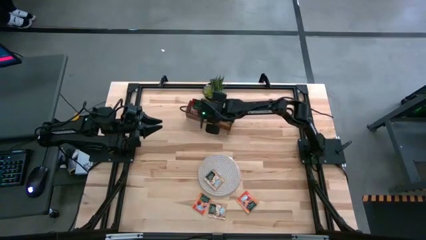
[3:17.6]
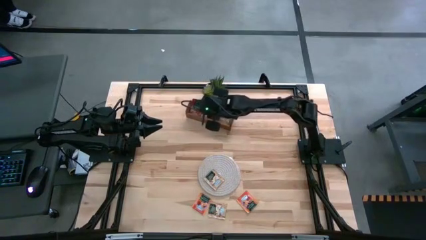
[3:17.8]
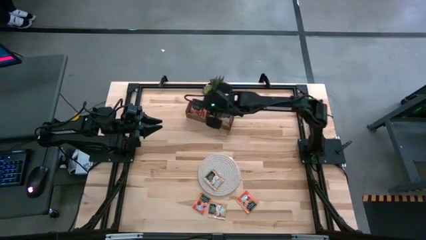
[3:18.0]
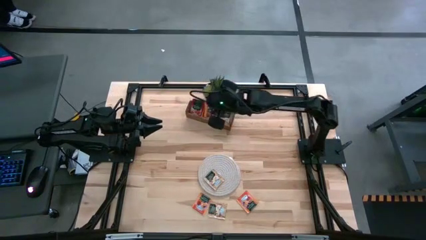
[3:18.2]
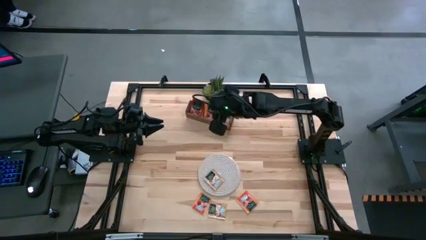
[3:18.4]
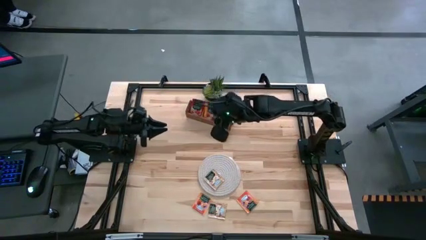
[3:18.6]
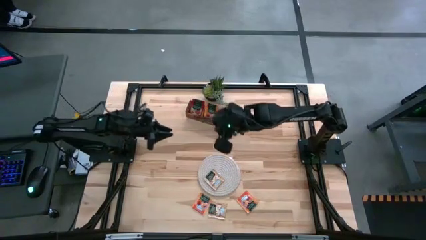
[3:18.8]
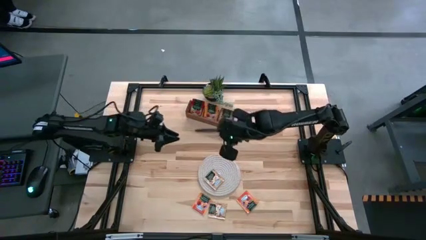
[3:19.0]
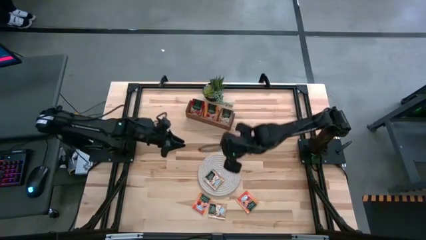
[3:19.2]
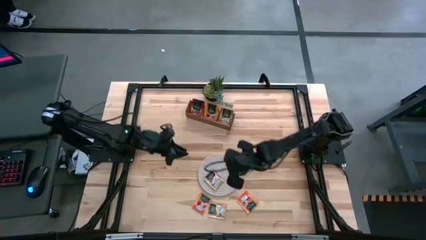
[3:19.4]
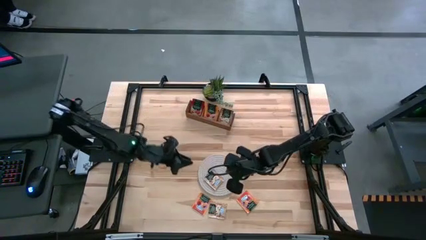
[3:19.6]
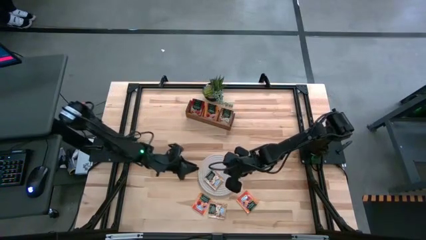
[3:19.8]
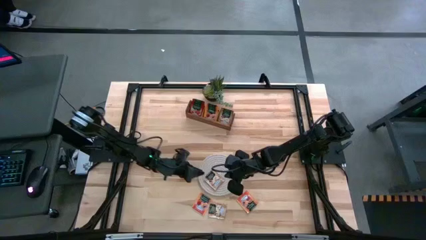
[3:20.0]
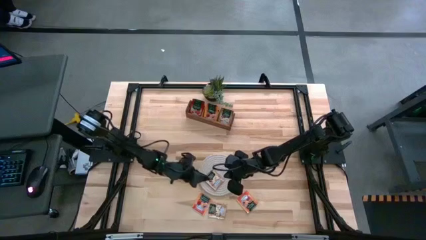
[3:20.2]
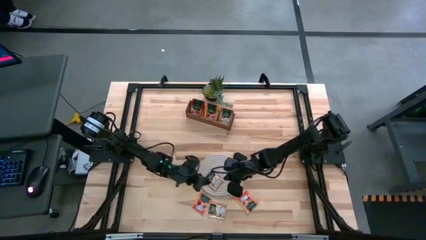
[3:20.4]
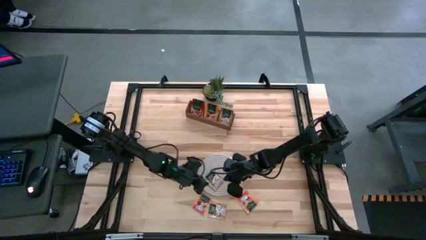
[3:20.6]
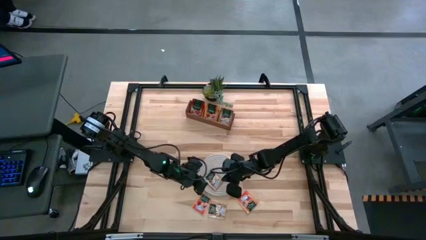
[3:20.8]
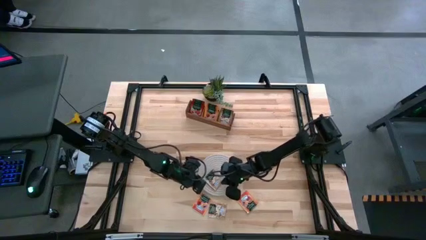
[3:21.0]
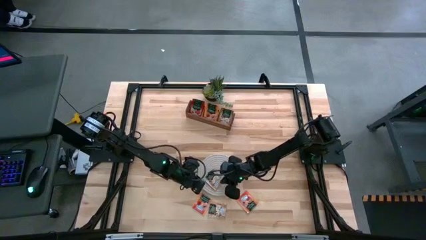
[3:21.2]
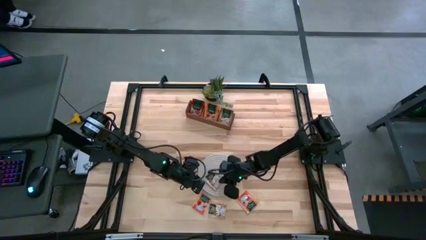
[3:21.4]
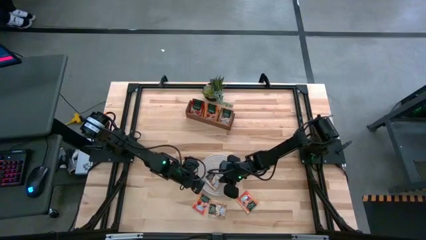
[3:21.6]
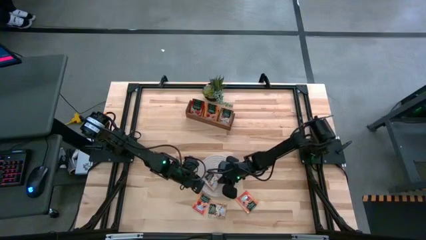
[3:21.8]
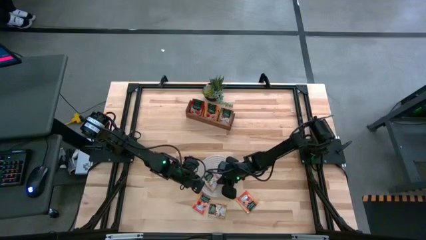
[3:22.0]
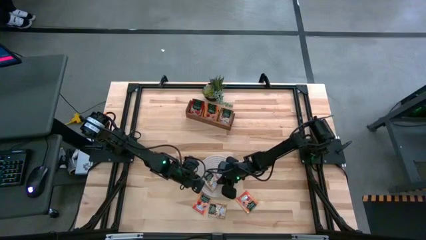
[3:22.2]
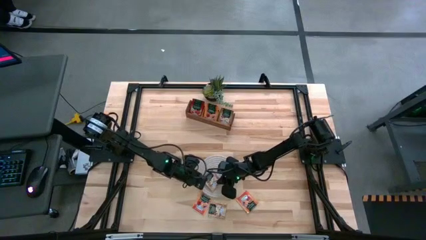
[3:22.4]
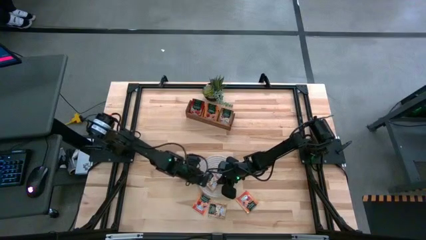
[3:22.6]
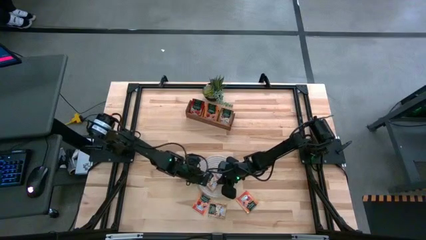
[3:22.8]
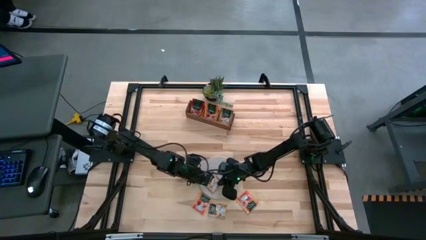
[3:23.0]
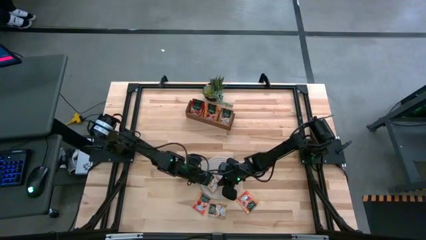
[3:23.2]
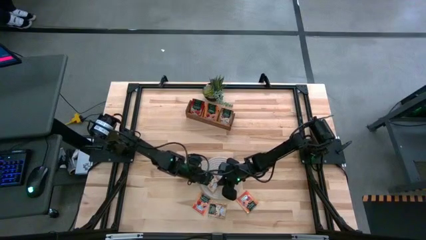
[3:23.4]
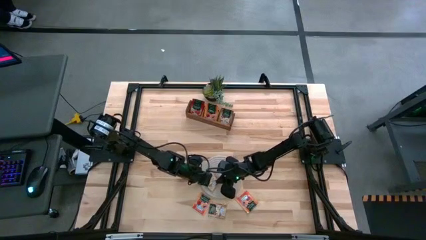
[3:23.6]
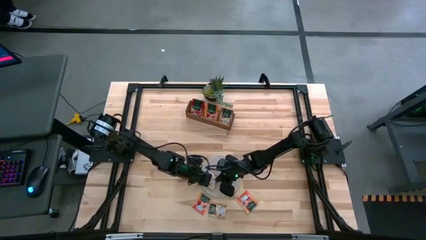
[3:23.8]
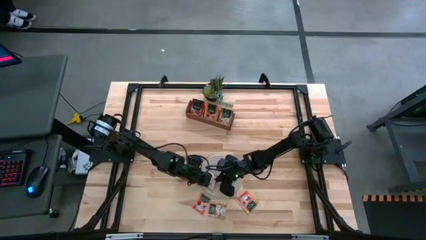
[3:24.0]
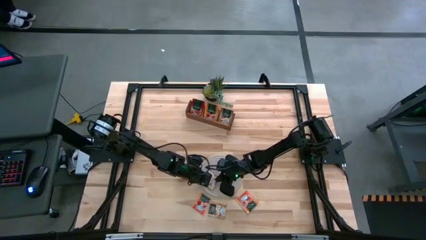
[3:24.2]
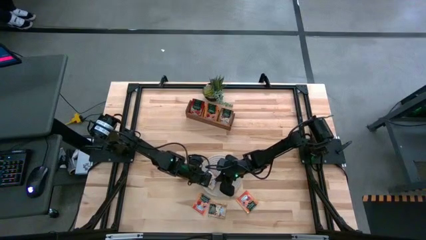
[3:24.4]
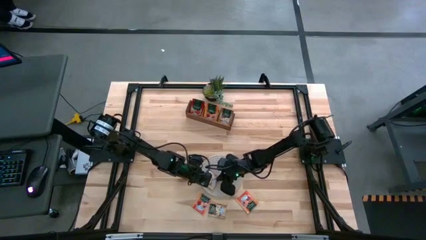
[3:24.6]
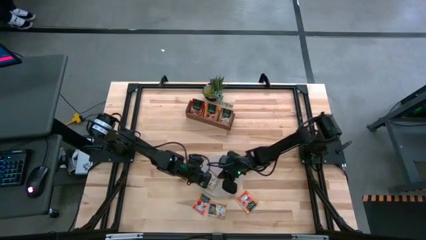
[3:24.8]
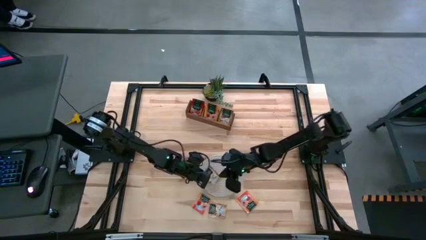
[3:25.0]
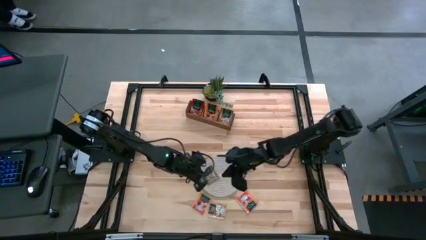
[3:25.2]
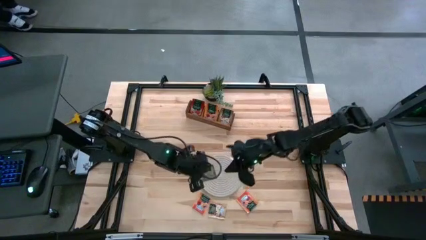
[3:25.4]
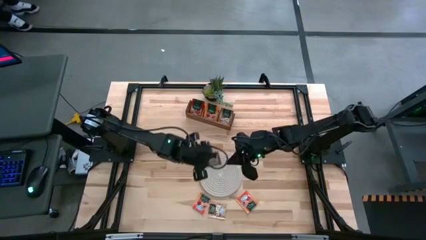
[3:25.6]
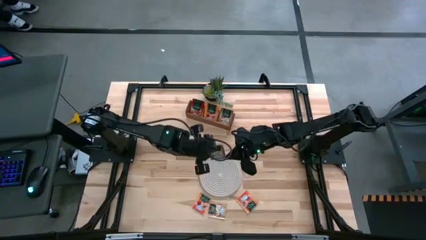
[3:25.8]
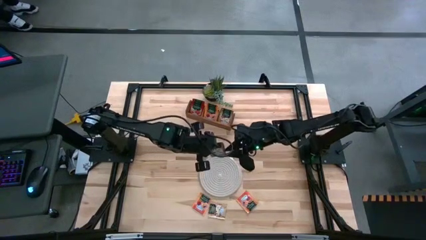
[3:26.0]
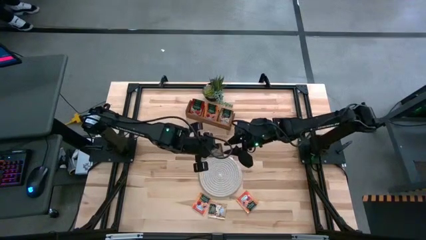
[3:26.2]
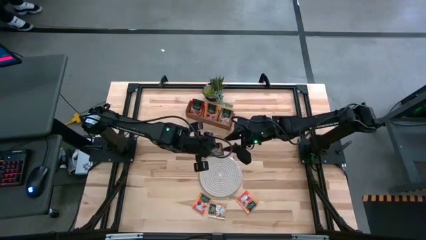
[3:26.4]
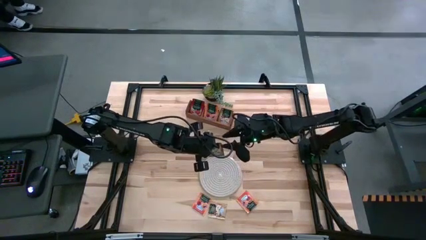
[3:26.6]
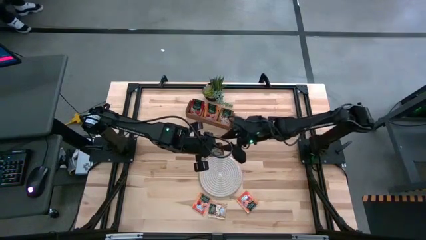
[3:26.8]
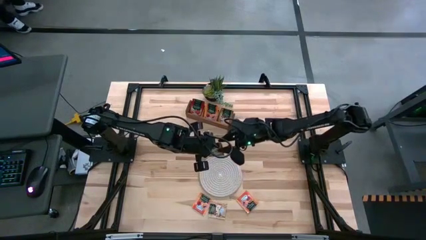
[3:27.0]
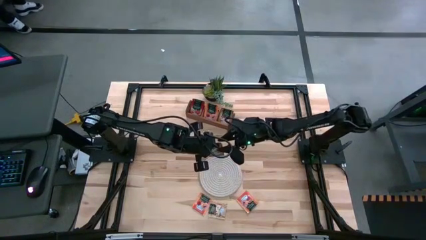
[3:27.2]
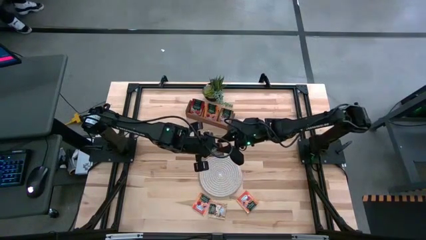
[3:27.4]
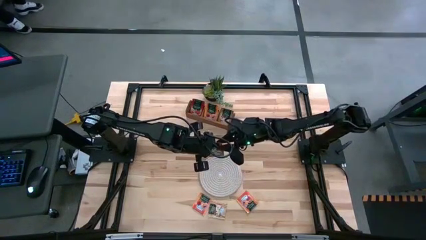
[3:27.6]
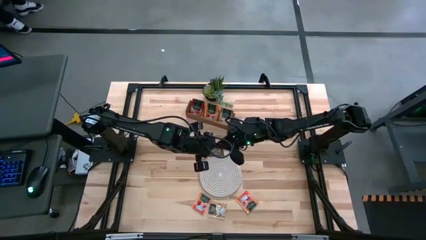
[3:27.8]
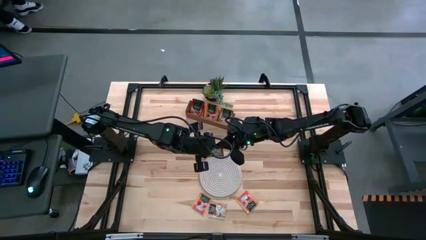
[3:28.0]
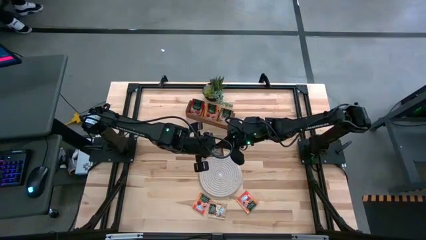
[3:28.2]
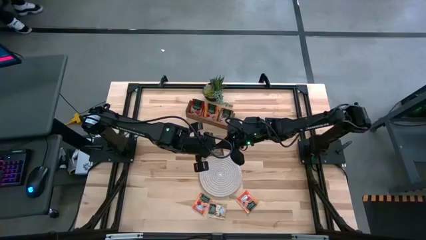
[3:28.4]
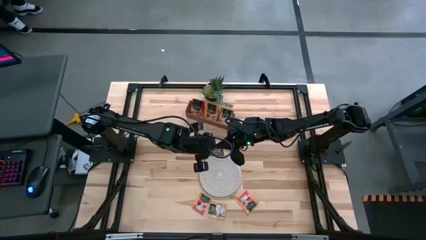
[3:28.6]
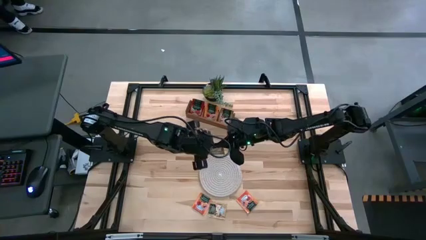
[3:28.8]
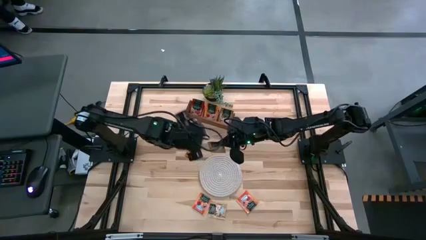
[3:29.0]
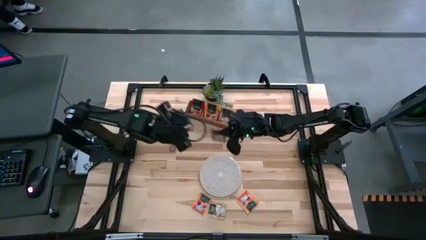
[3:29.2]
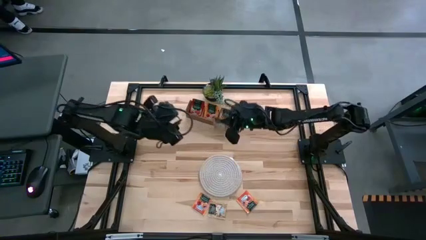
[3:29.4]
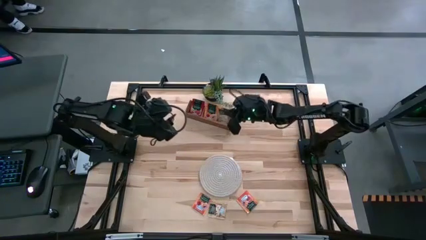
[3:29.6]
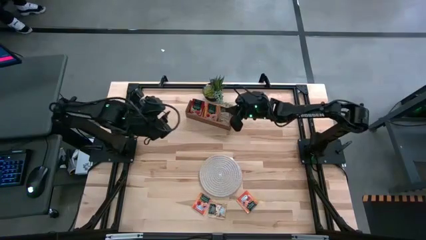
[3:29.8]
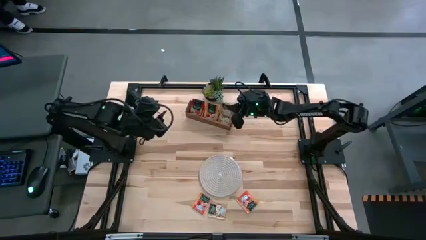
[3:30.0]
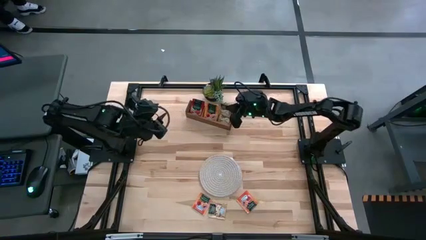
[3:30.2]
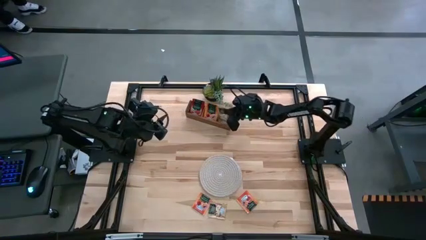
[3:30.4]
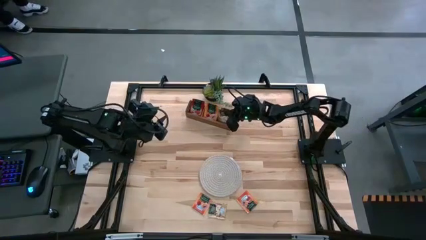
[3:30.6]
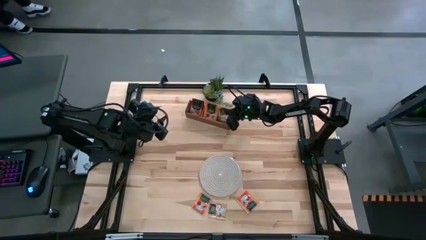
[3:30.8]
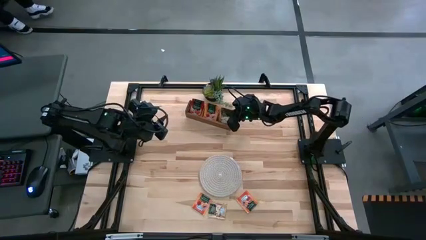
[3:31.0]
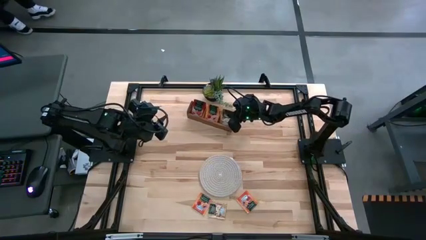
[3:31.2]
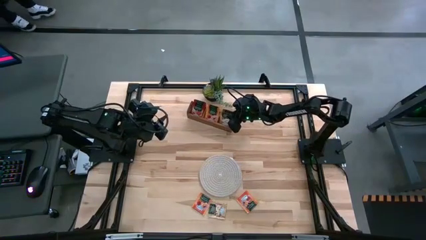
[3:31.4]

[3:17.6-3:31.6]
Task: Pick & Place Tea
Put the light brown tea bag into the right section of the wooden organizer
